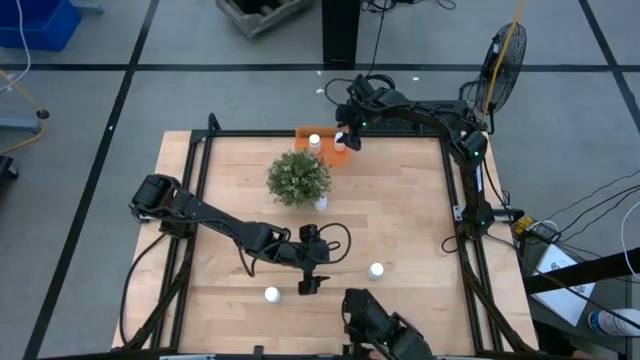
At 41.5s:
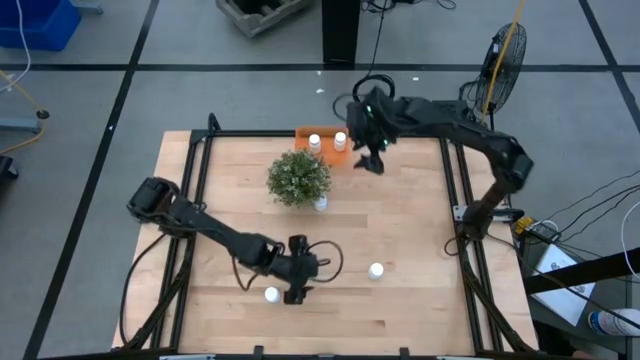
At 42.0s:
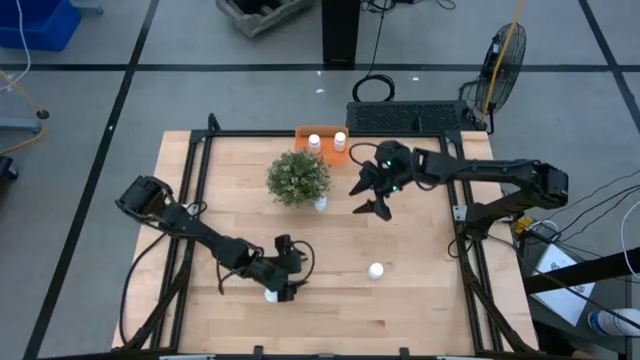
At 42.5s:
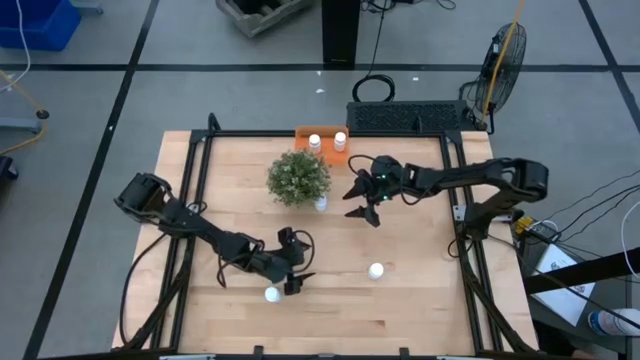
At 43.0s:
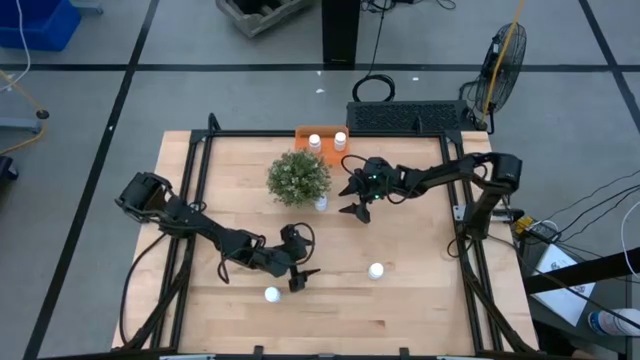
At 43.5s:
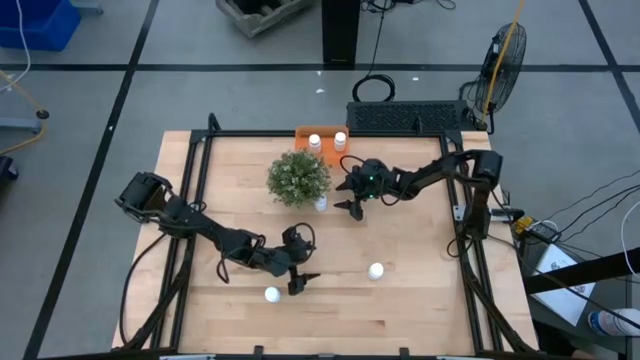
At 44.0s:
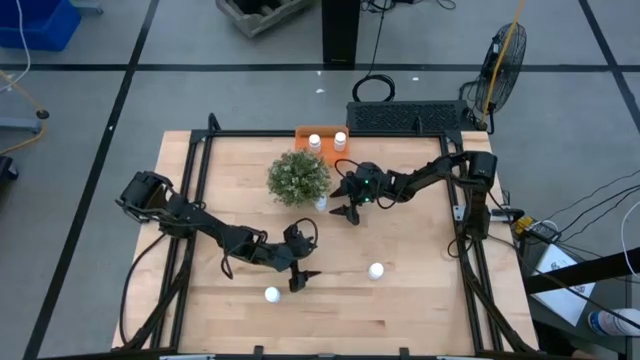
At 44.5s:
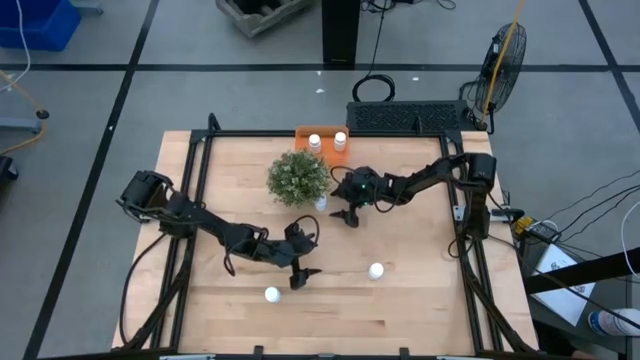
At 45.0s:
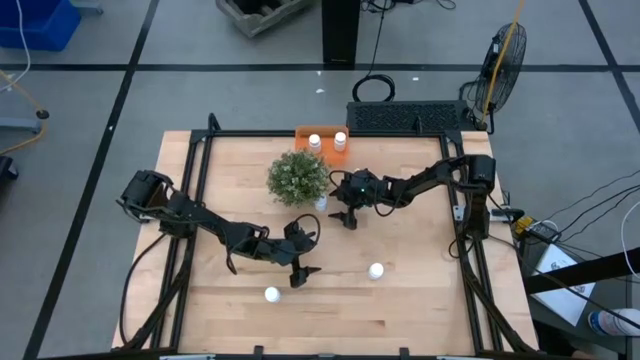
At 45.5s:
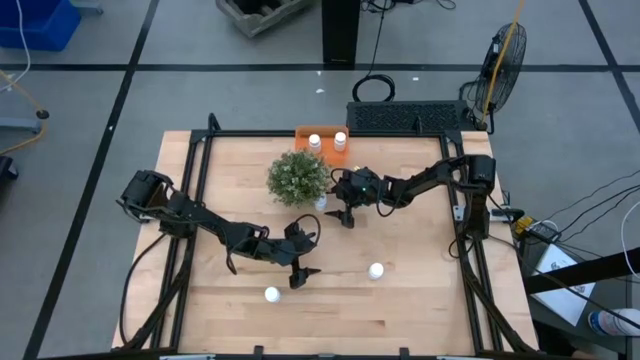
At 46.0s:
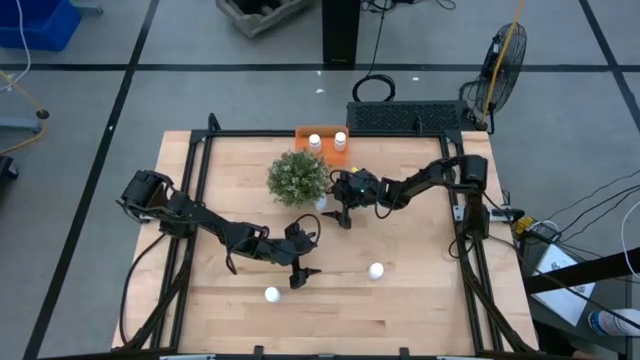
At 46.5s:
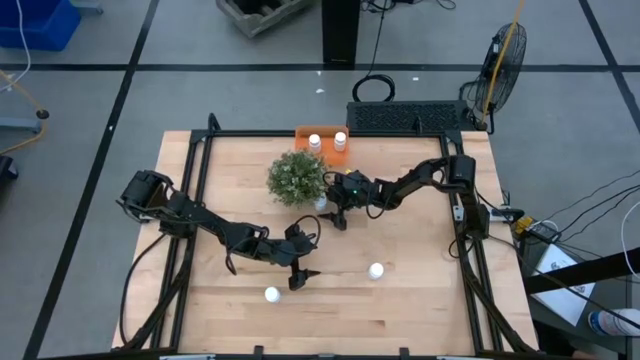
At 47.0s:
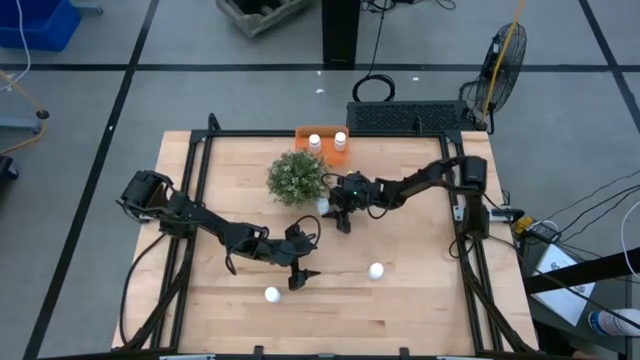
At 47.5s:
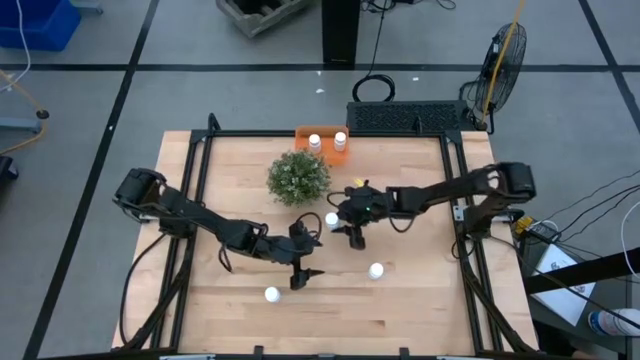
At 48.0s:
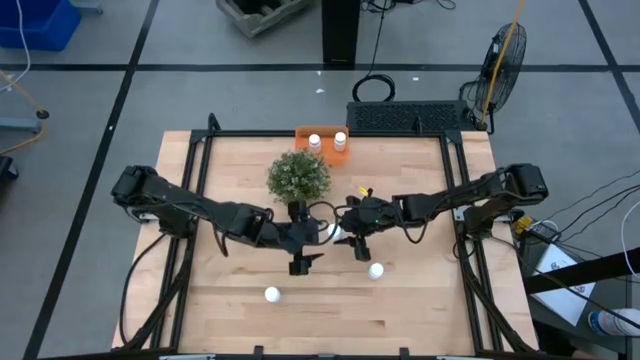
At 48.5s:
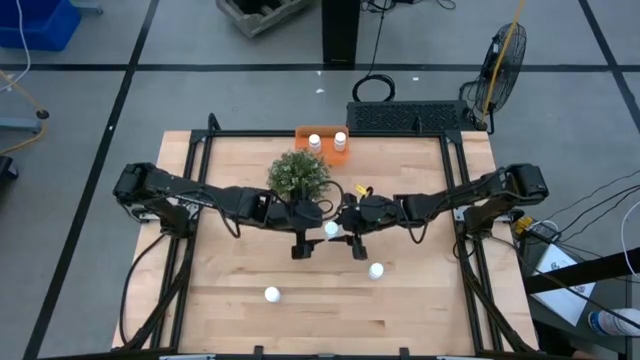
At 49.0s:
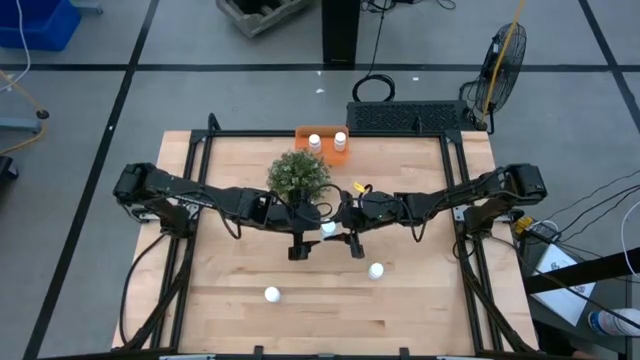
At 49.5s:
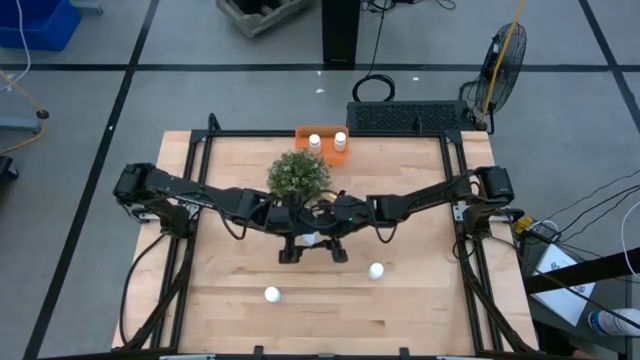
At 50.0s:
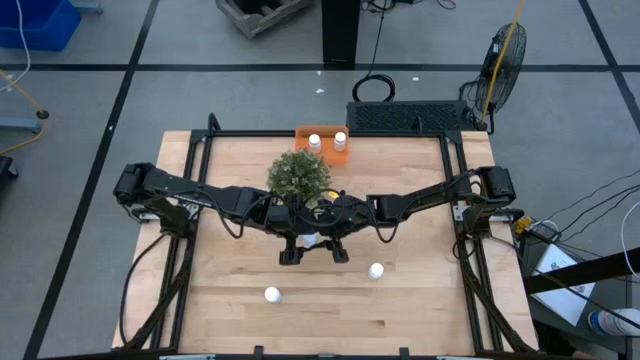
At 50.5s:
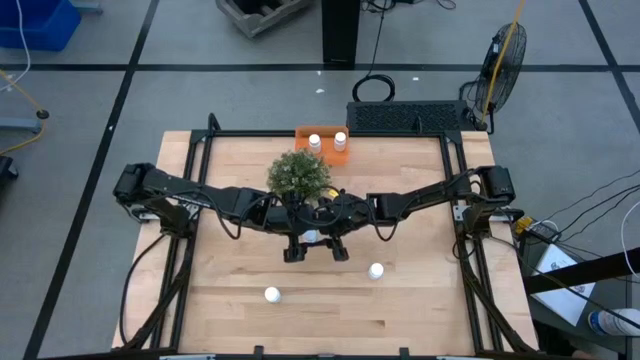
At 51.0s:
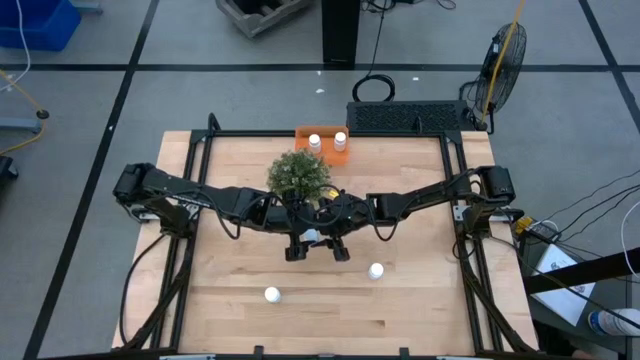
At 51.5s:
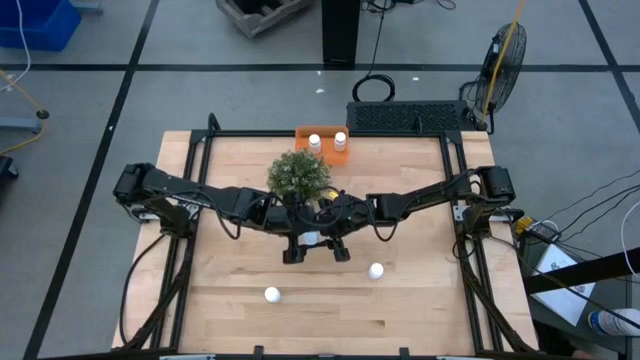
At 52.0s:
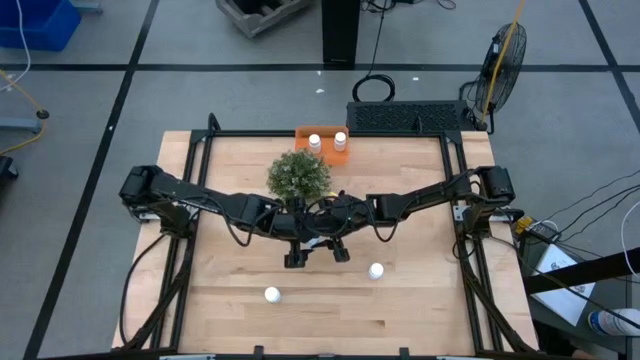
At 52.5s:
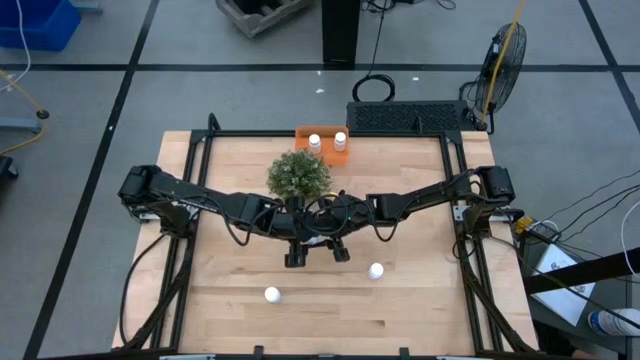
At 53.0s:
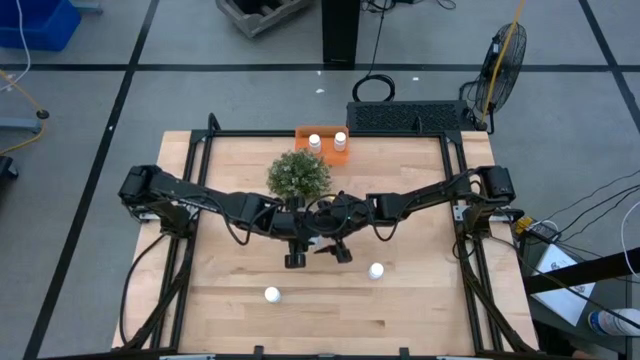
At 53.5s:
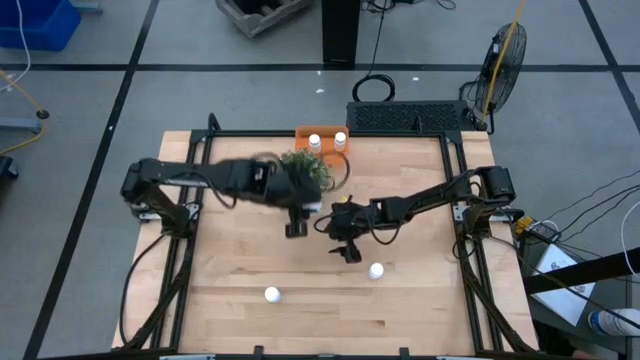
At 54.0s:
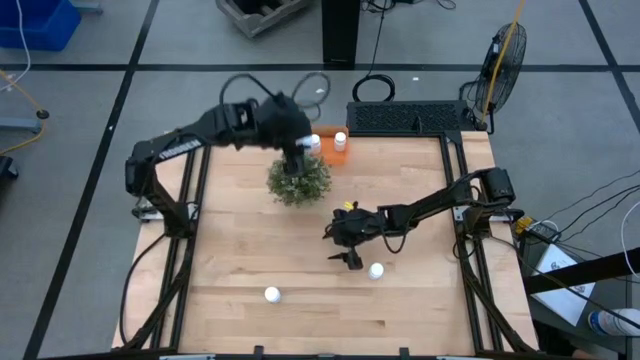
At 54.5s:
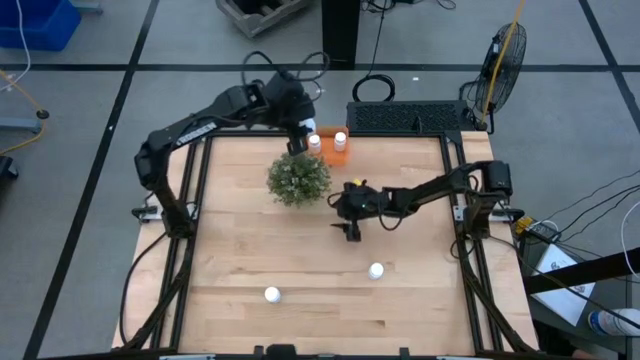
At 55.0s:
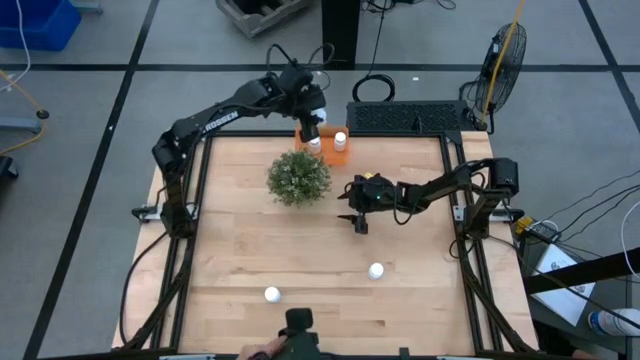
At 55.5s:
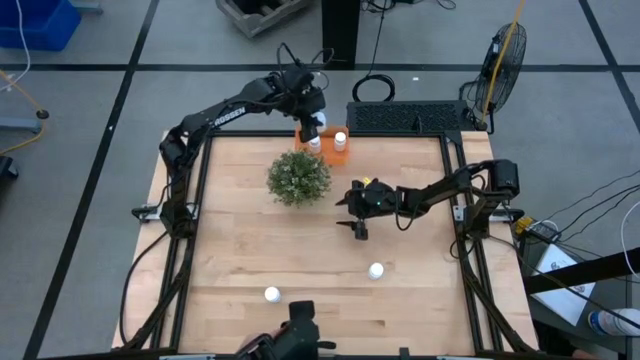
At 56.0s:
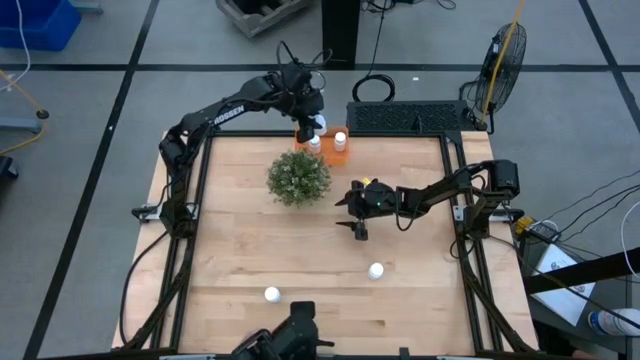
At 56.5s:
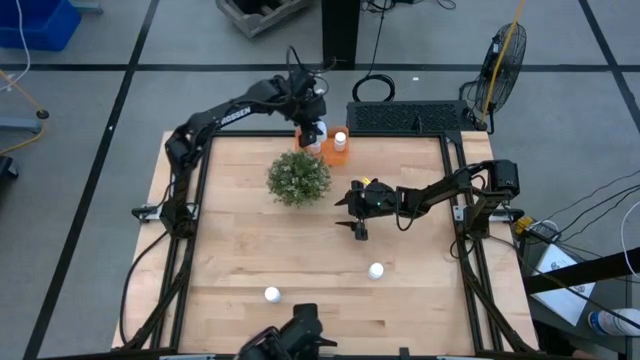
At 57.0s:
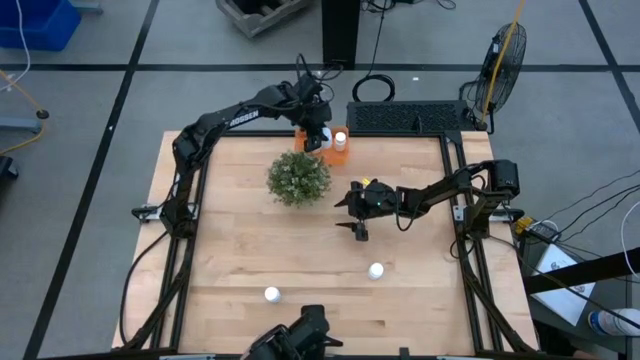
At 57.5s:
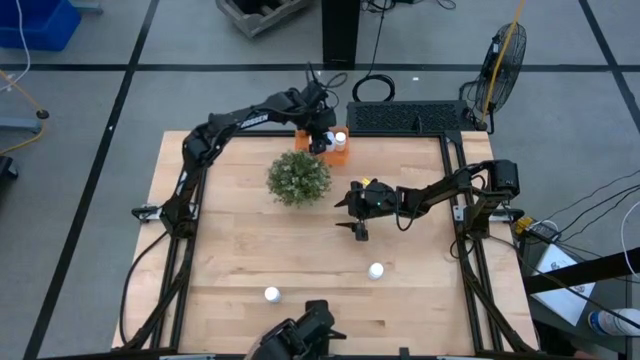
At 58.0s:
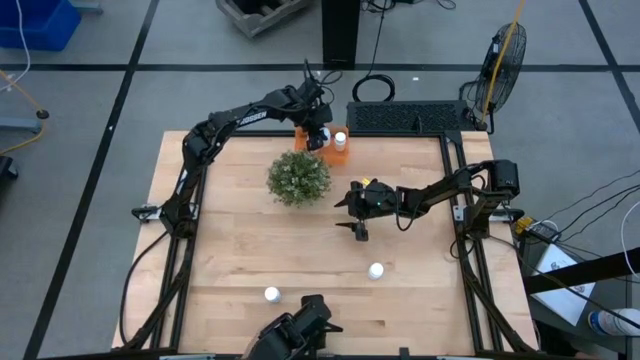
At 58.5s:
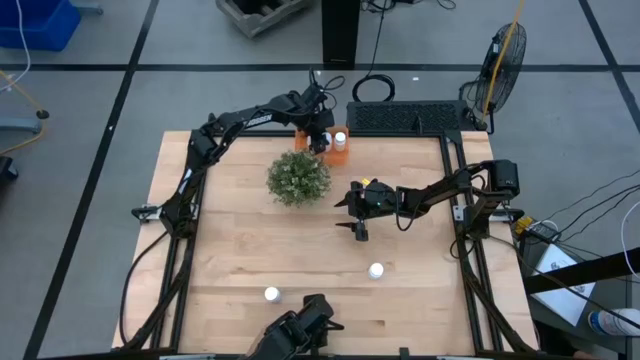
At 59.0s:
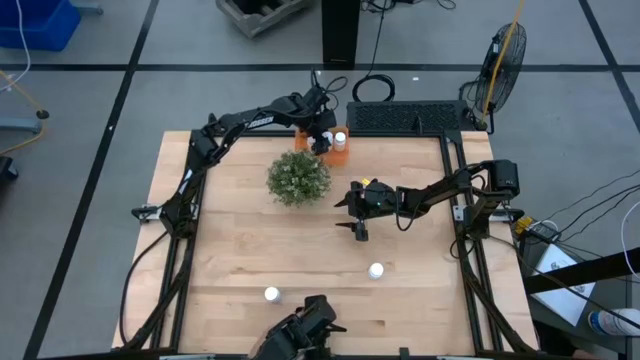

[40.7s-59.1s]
Task: Pick and place pill bottles into a basket
Put the white pill bottle into the orange bin

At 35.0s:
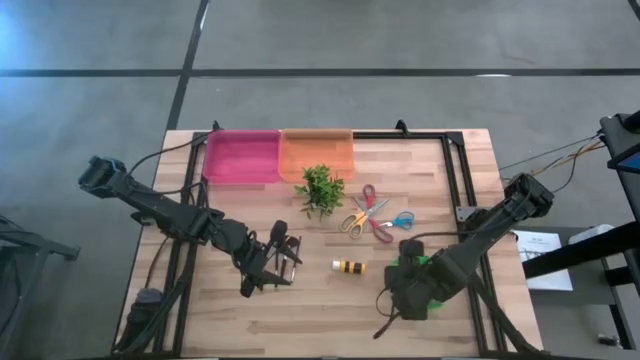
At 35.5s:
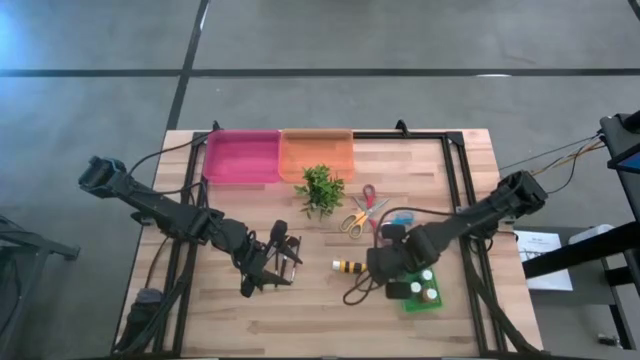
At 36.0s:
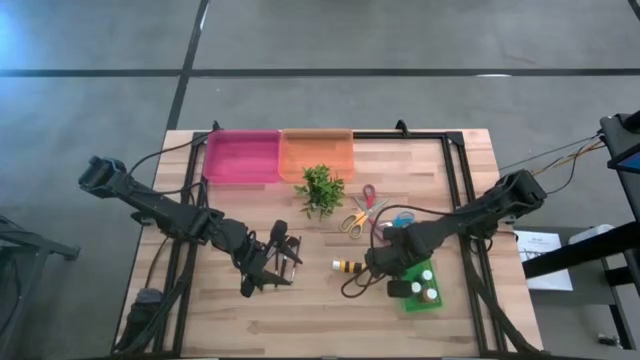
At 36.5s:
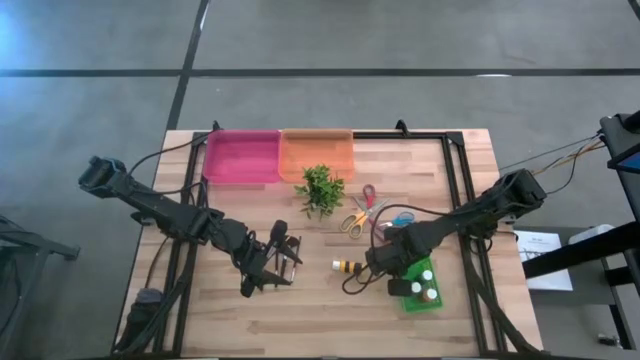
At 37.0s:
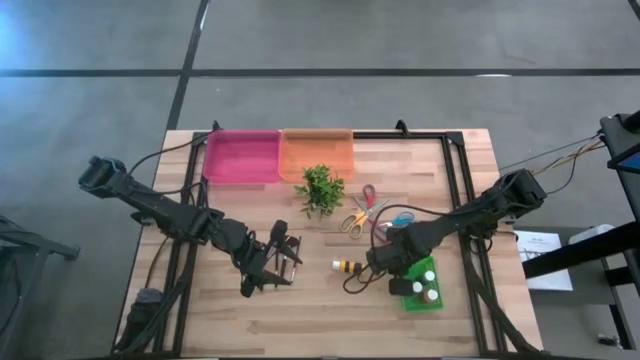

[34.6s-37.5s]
Task: Pick & Place Paint Supplies
Adjust the green bin on the table
